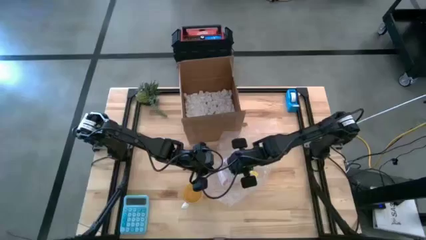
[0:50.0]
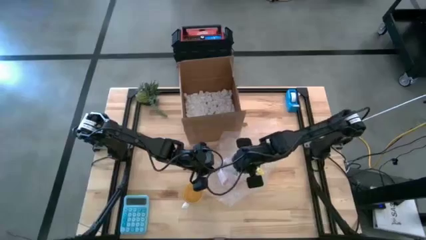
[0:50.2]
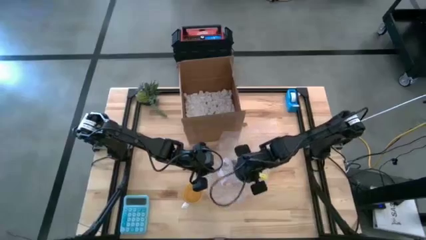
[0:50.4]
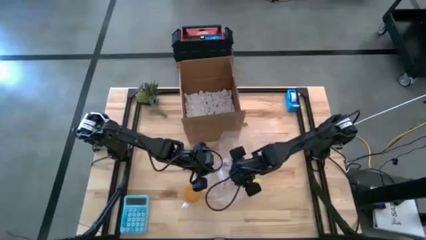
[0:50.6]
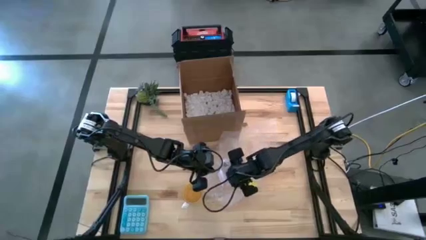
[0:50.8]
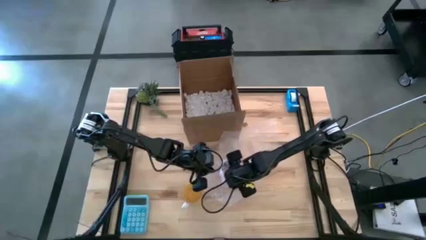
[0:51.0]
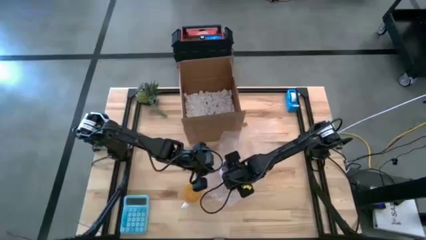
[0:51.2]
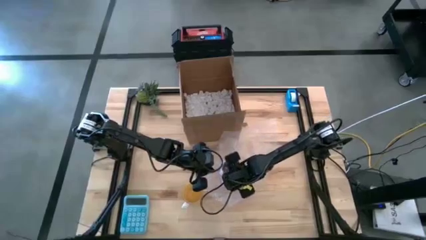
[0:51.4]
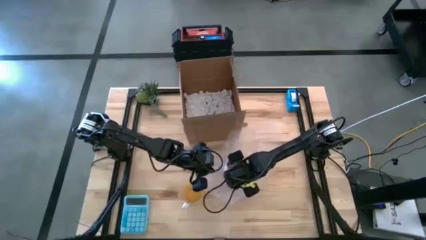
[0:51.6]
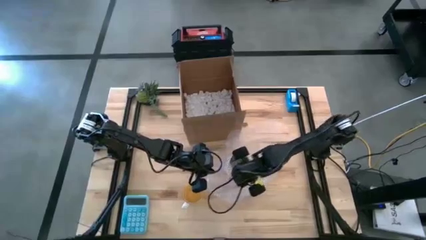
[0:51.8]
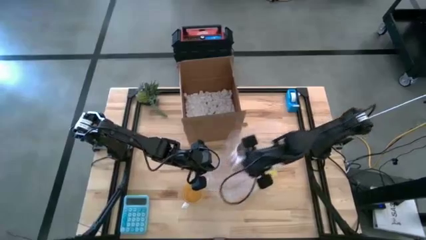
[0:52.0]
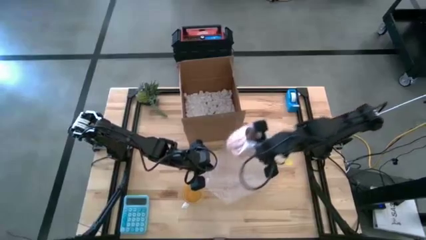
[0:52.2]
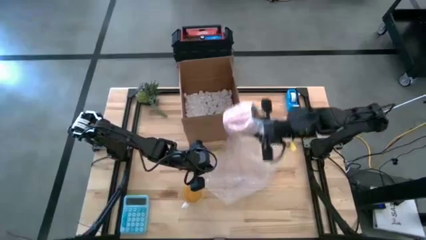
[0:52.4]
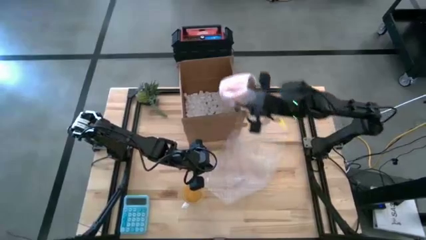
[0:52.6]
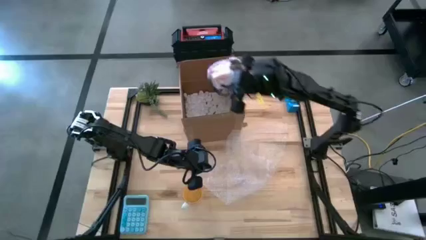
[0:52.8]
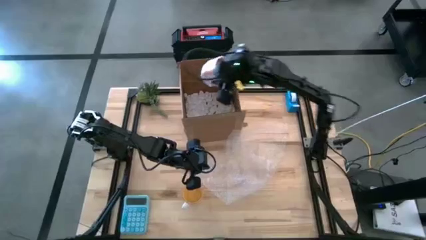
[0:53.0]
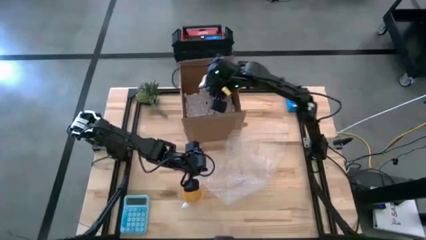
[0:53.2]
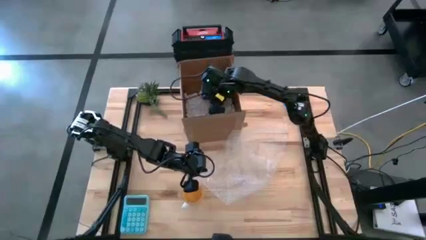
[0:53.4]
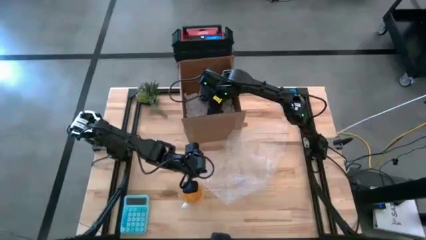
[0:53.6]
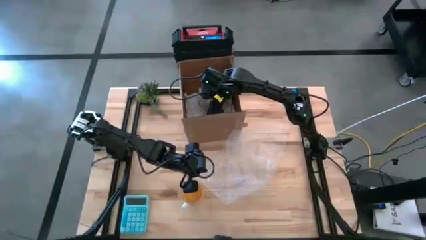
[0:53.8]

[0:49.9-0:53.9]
Task: wrap mug
Put the wrapped orange mug into the cardboard box

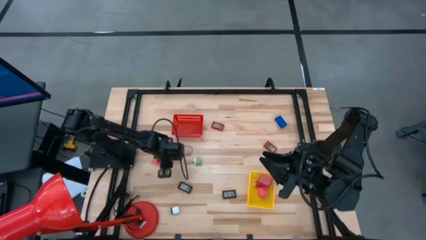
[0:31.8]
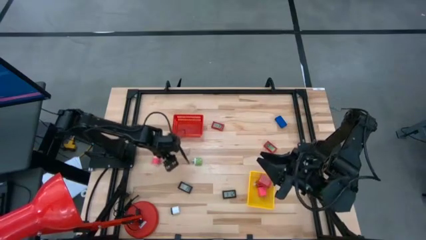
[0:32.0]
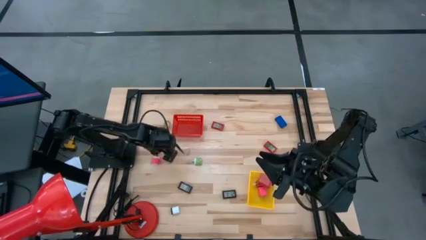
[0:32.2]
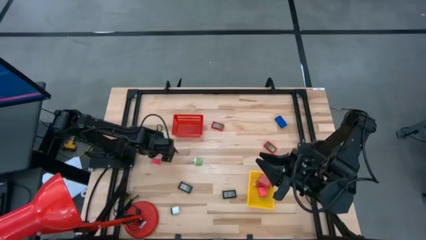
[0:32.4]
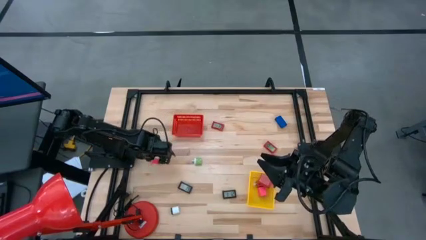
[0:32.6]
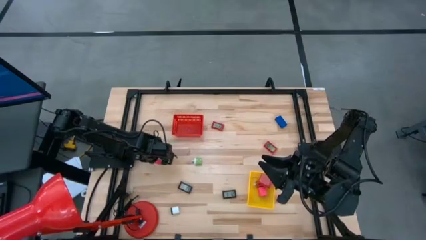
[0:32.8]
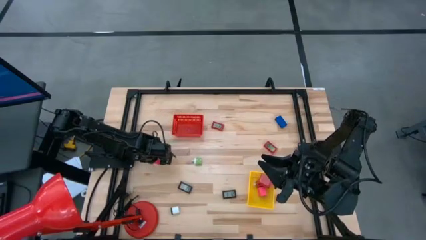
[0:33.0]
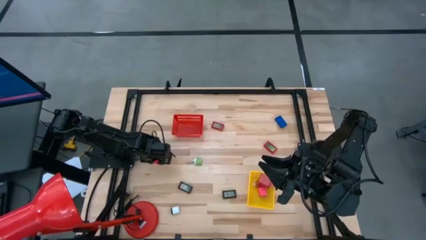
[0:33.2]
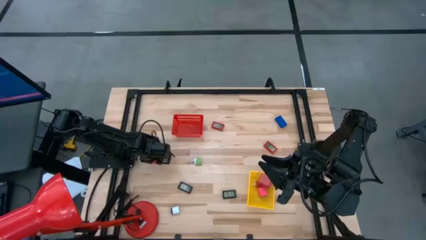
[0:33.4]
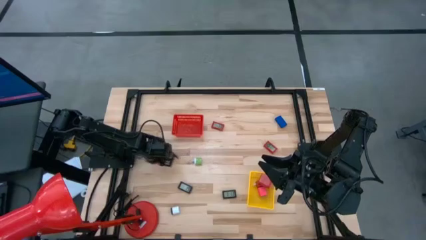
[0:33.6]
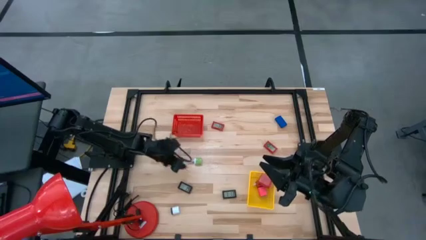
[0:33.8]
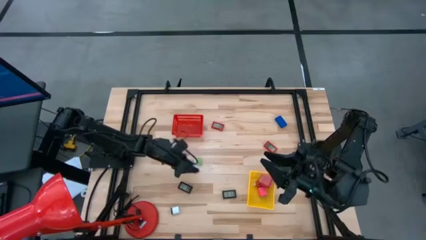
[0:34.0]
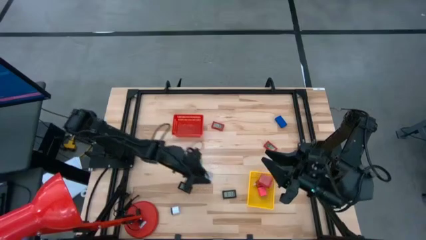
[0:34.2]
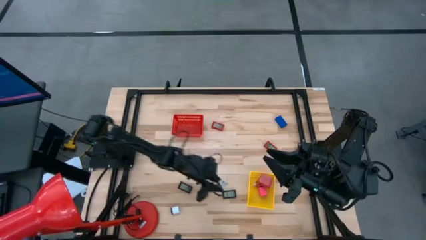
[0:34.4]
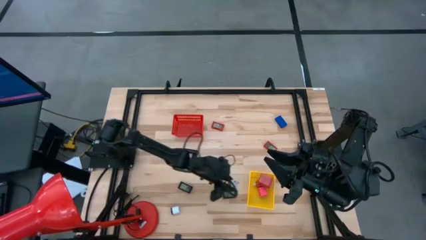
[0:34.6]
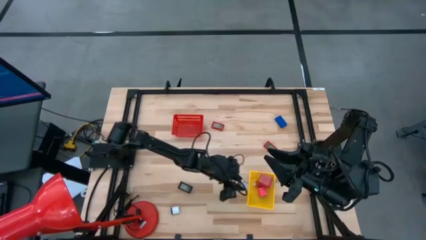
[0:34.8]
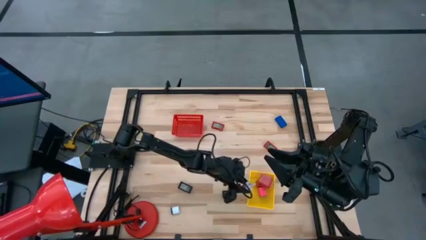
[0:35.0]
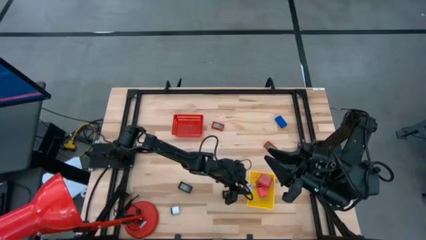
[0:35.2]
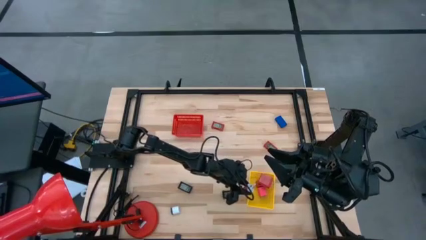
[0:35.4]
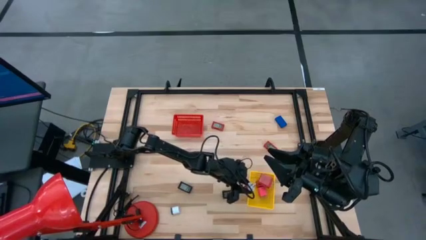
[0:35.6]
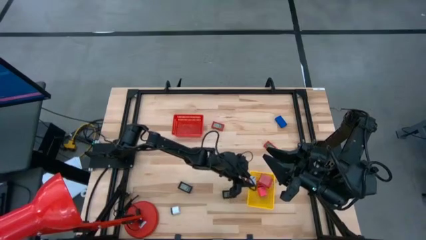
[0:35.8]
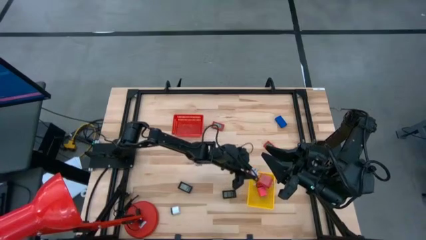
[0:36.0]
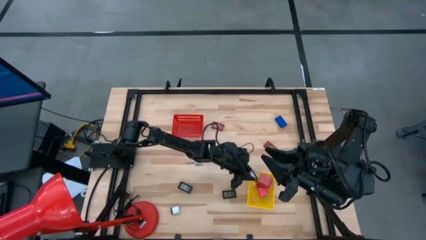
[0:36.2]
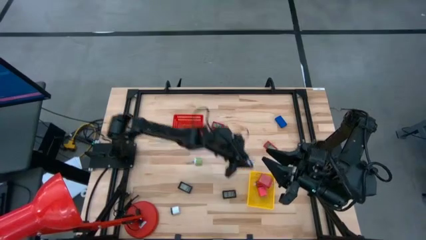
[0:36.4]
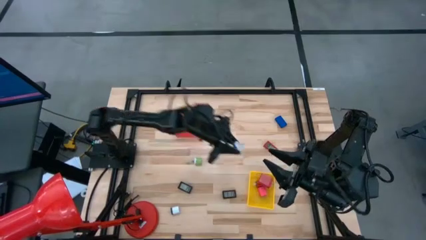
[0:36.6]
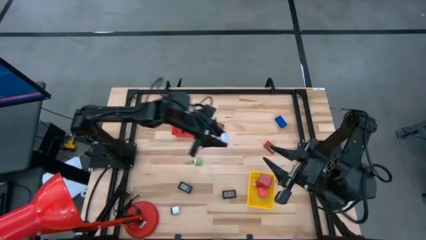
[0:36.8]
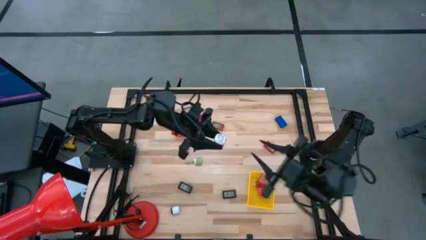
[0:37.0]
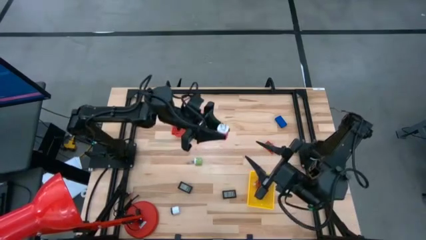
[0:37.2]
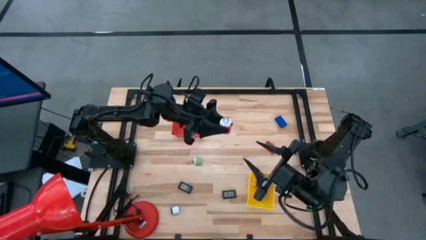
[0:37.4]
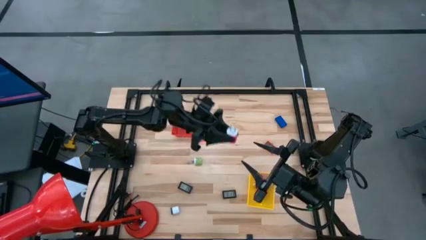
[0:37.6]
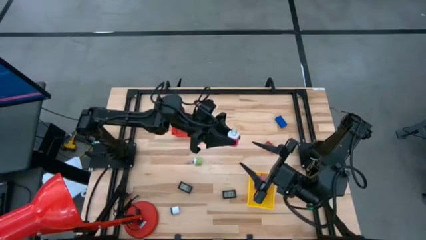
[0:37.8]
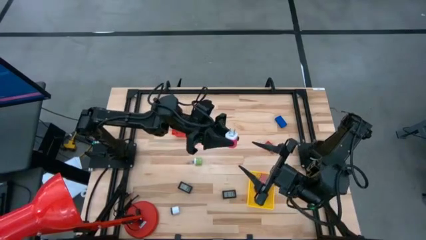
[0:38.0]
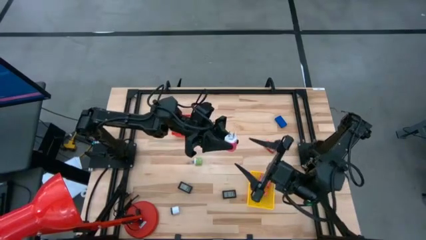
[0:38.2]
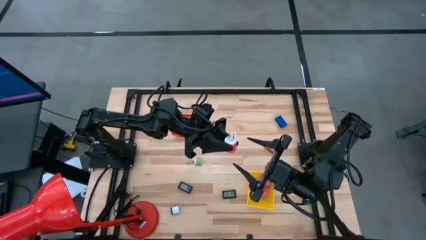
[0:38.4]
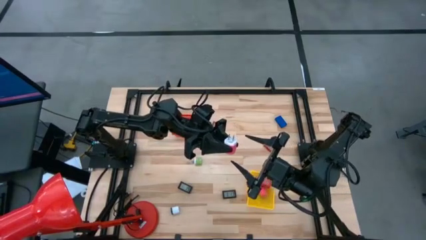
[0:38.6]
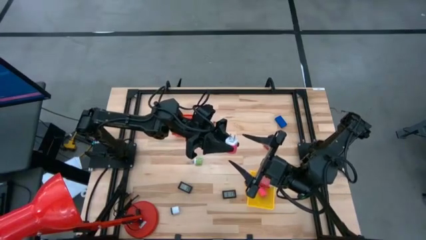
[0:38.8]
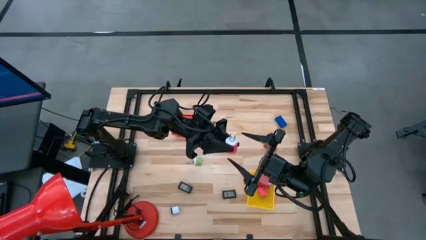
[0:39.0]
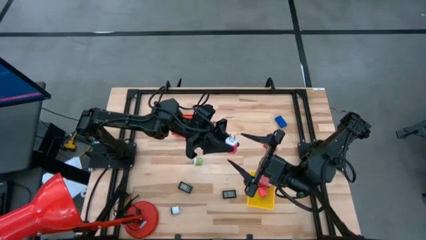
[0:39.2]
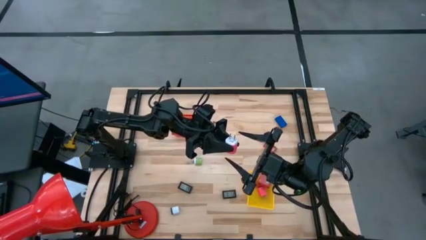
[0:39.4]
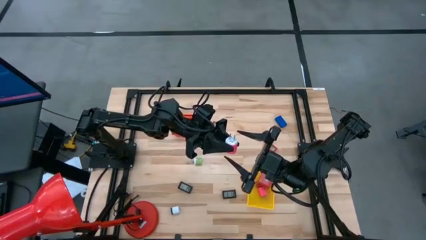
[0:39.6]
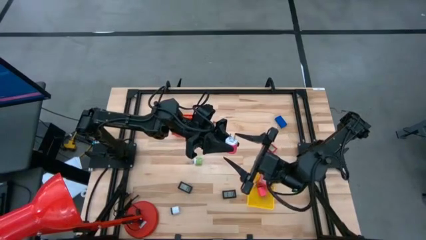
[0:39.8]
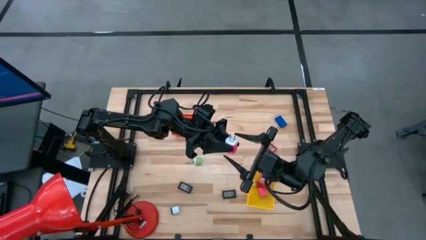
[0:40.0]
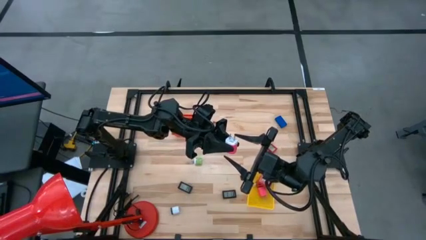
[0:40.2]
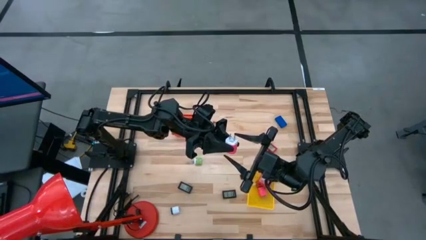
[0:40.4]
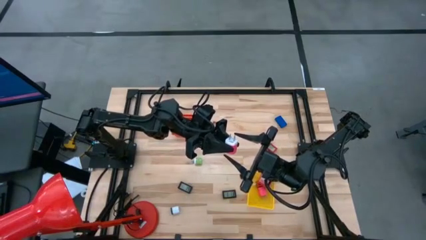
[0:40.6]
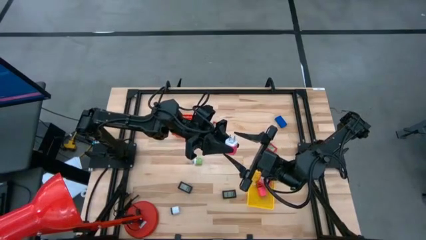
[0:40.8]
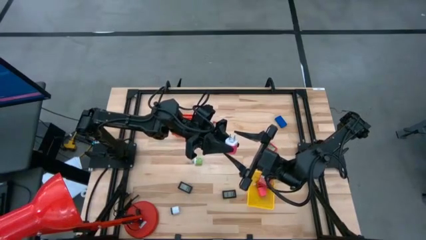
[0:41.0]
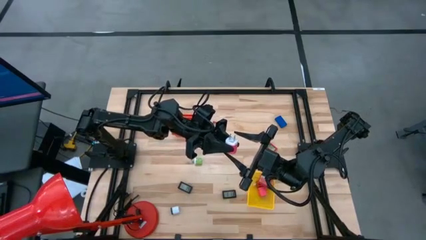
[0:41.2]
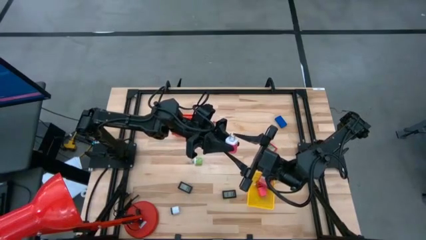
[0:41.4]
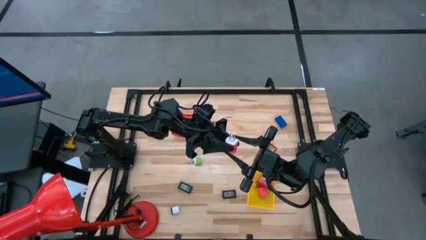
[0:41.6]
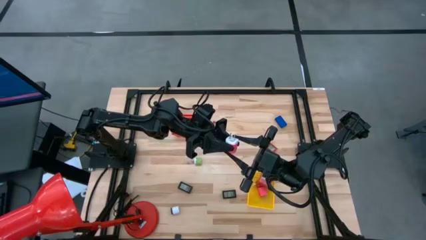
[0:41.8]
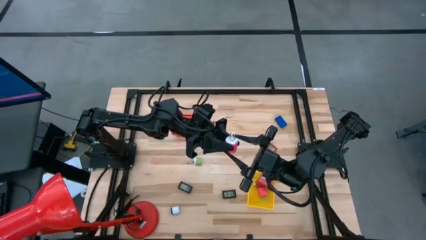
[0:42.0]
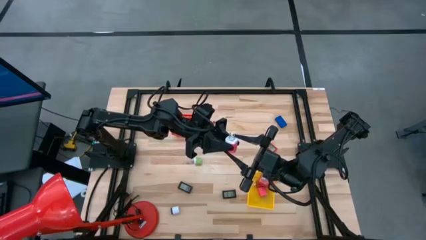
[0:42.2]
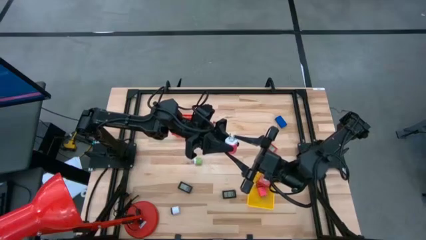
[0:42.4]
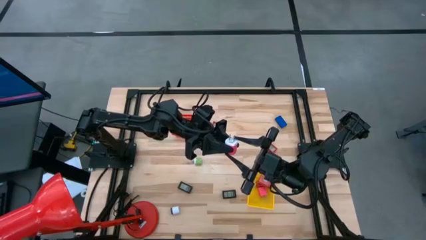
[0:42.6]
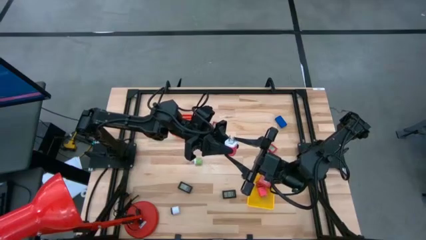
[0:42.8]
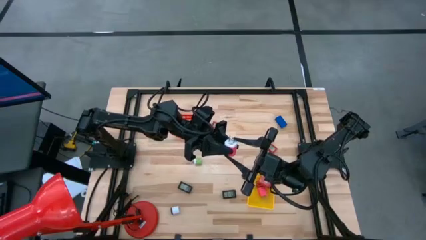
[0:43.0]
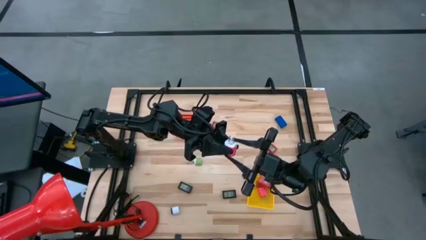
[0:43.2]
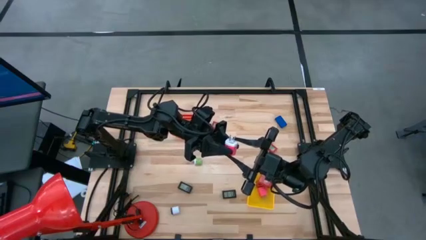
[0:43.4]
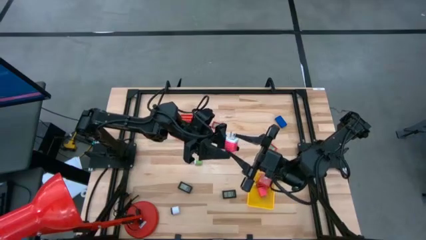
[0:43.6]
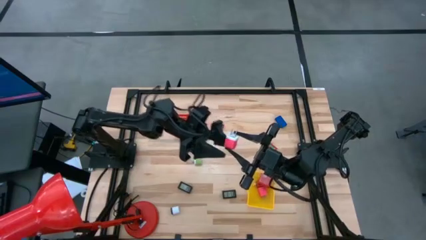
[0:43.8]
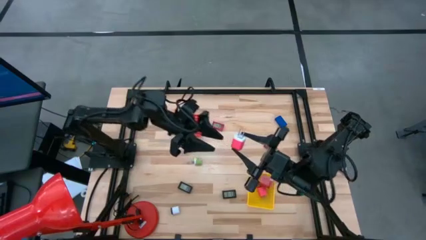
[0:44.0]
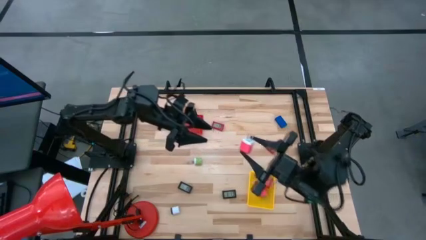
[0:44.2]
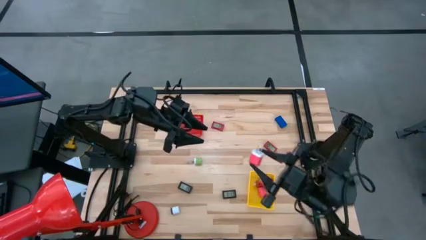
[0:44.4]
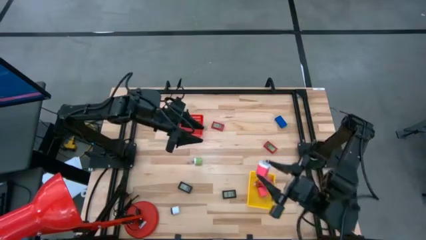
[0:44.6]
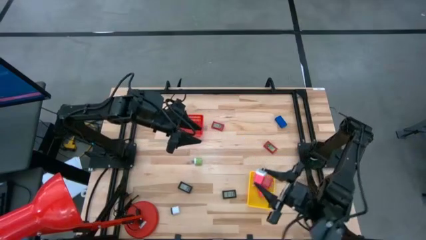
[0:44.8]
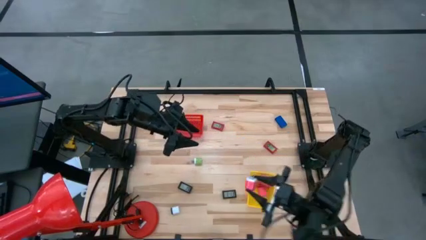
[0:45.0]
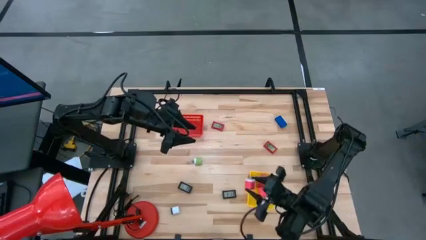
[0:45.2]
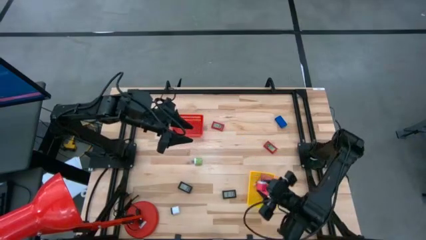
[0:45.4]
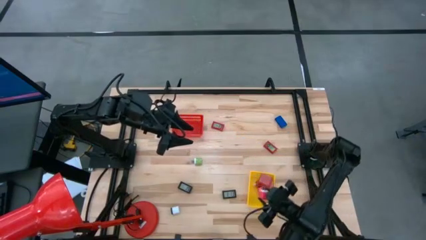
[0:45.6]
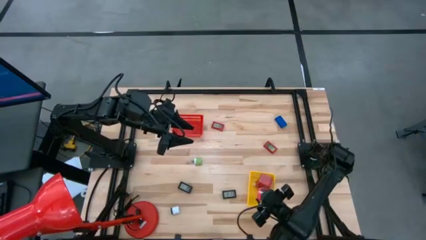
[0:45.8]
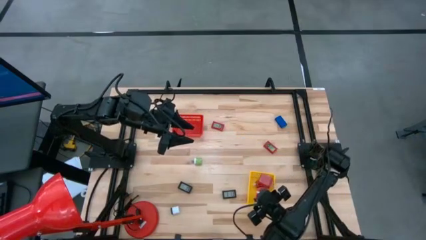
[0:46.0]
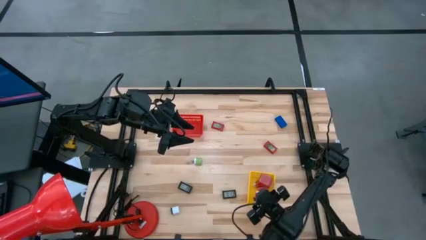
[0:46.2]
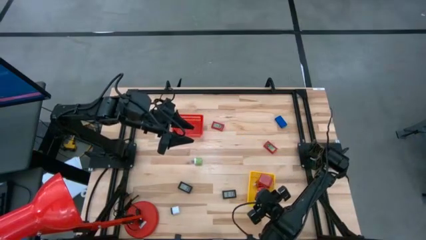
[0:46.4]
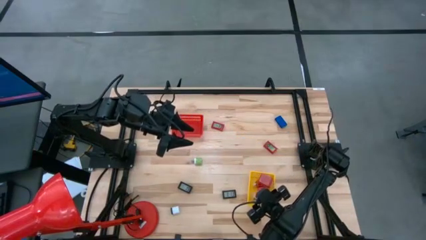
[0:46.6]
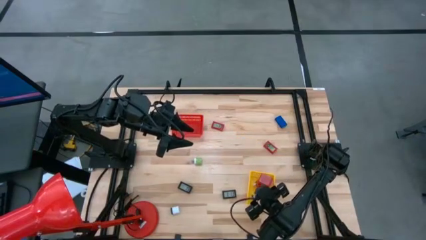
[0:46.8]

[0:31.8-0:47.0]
Task: Pick & Place Office items
Put the pink charger adapter into the yellow basket
